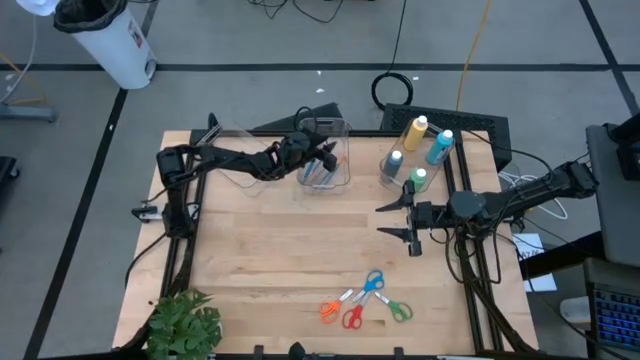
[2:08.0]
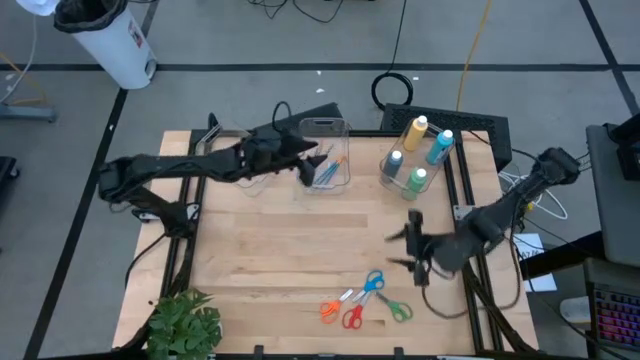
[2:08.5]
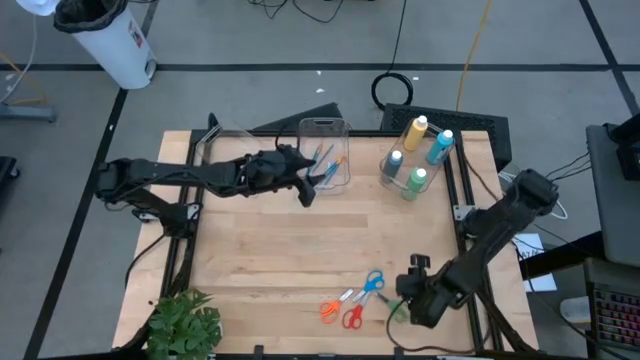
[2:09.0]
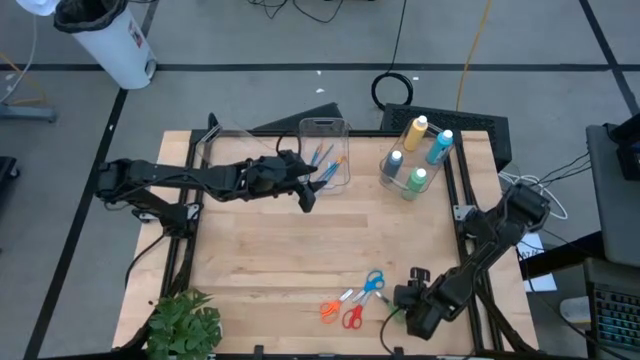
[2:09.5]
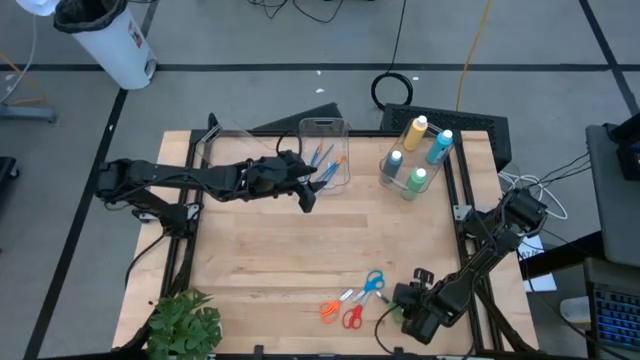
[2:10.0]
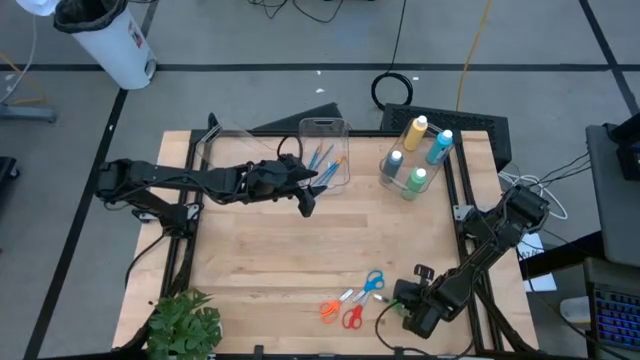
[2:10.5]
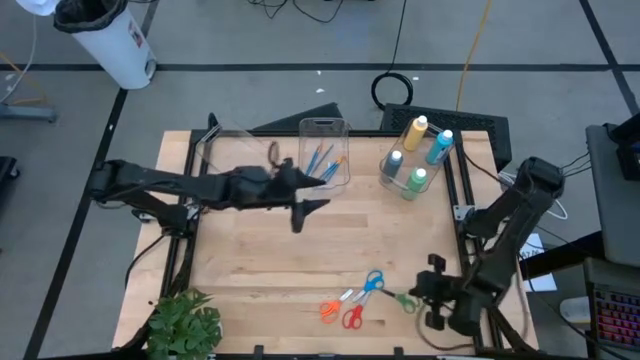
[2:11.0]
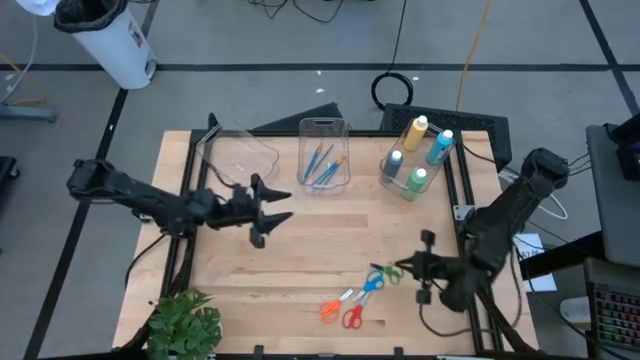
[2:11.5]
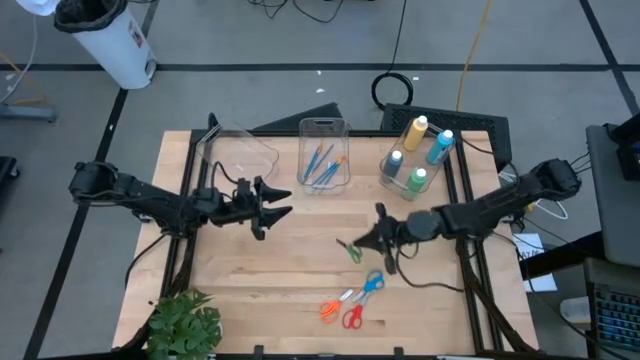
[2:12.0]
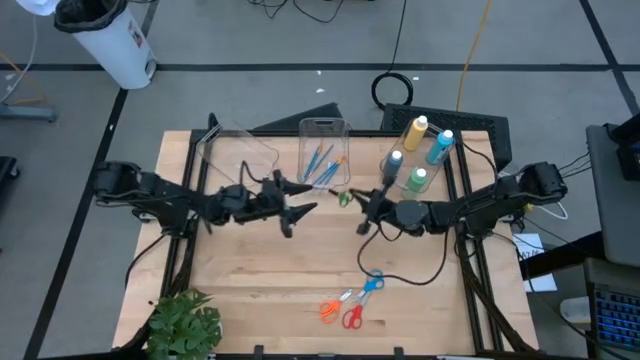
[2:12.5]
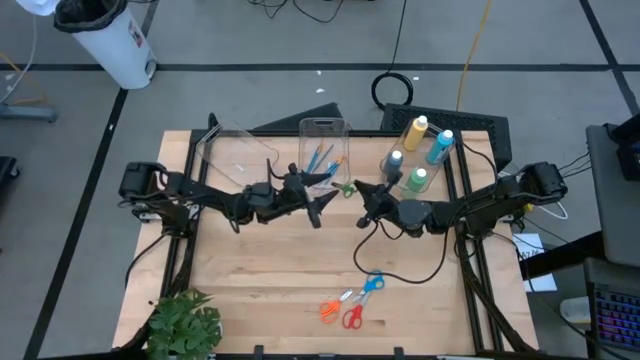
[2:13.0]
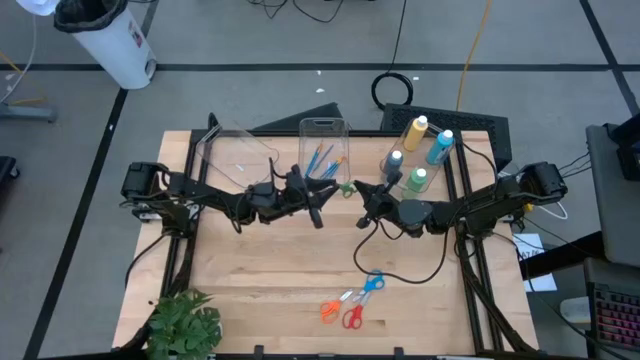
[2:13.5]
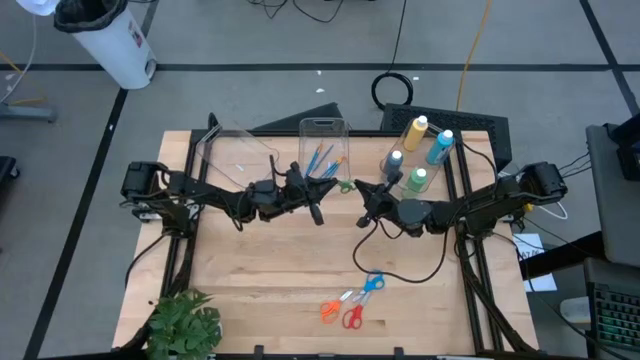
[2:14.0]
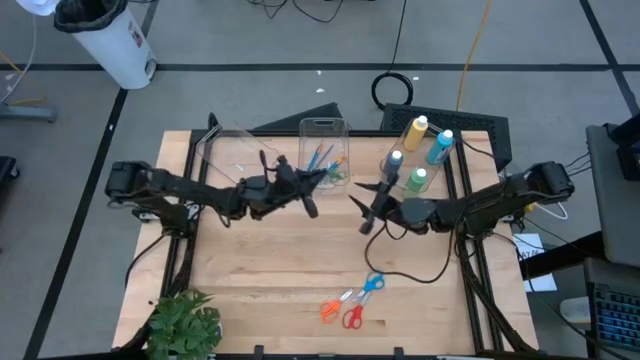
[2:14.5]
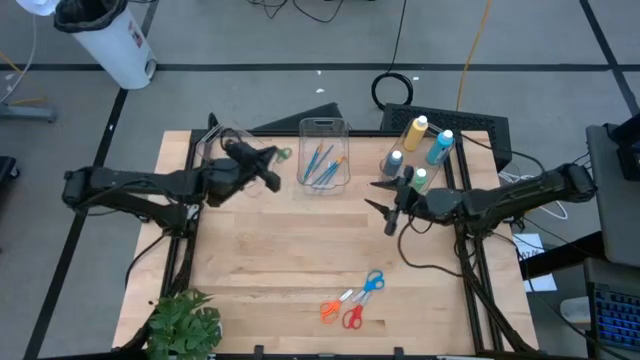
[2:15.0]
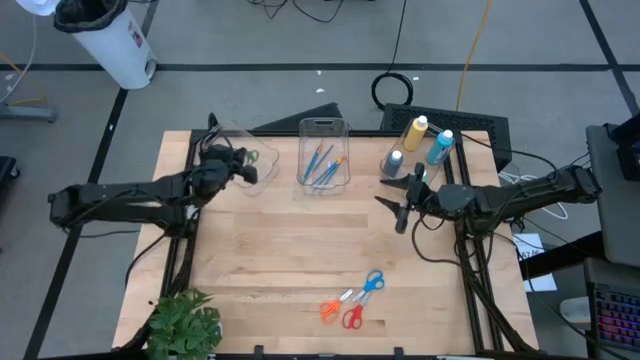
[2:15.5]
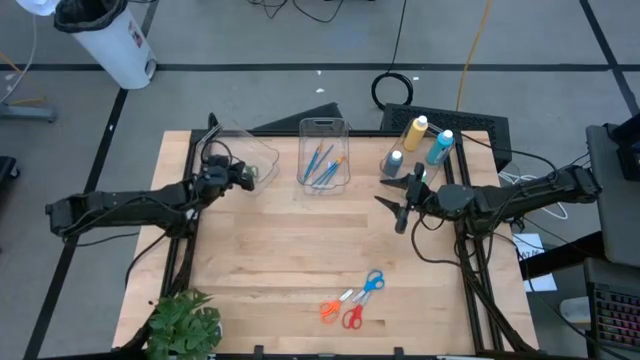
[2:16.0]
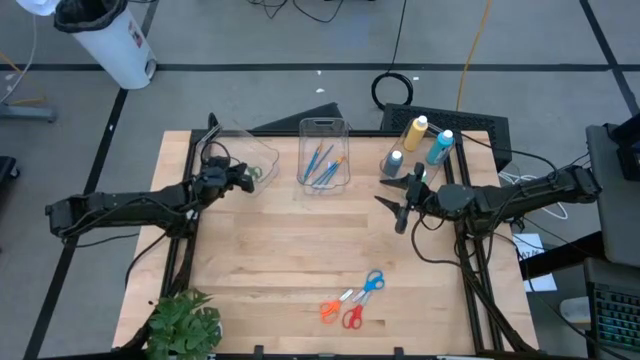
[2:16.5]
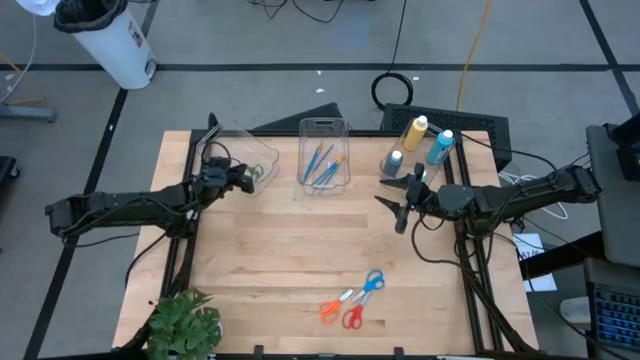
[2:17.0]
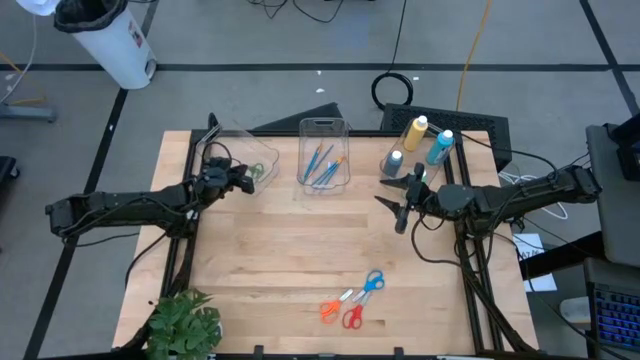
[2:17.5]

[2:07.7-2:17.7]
Task: Pick & Place Paint Supplies
Put the green scissors into the left transparent bin

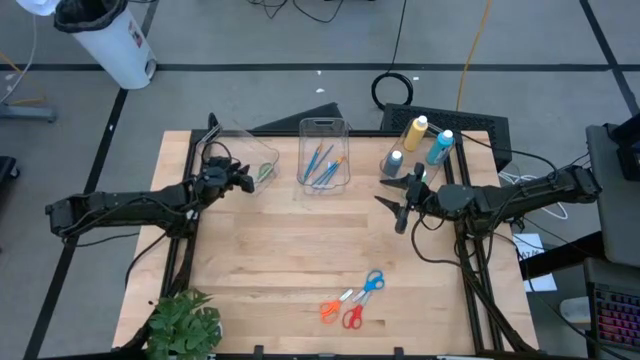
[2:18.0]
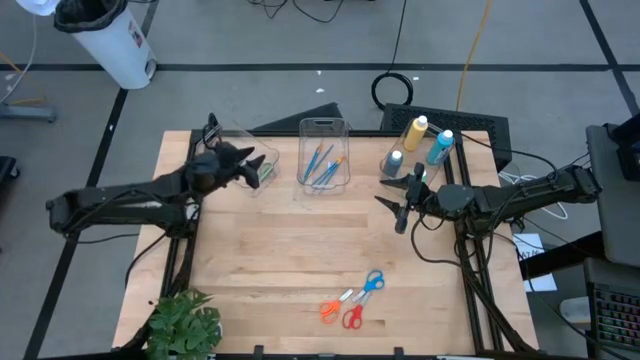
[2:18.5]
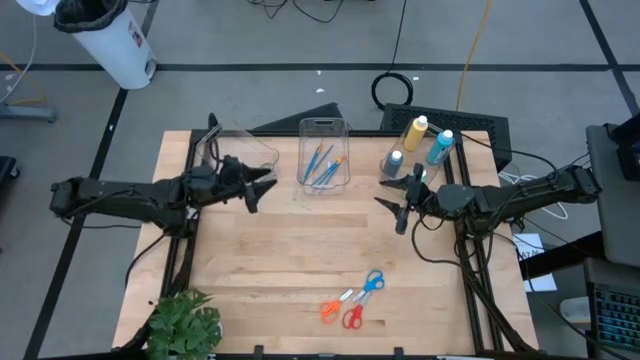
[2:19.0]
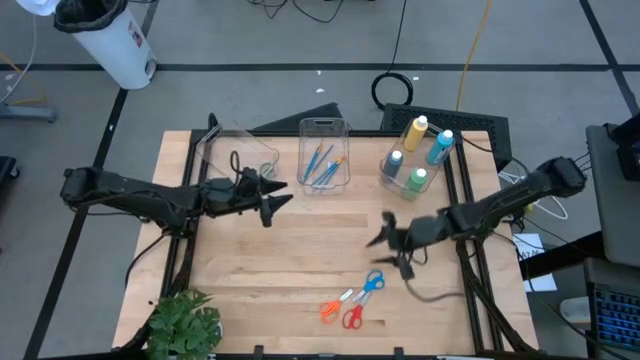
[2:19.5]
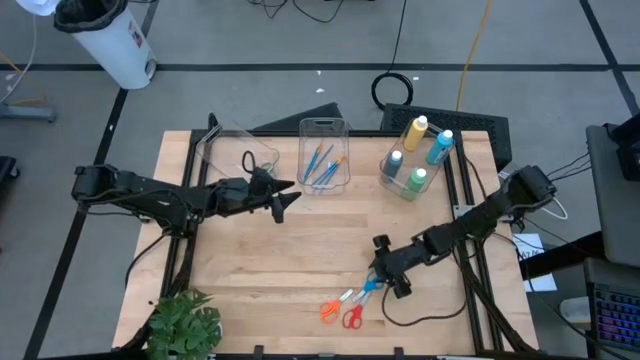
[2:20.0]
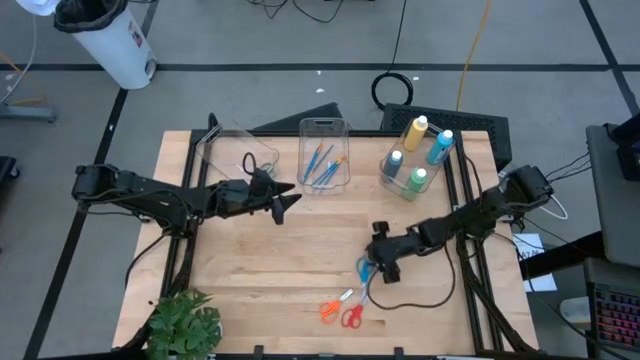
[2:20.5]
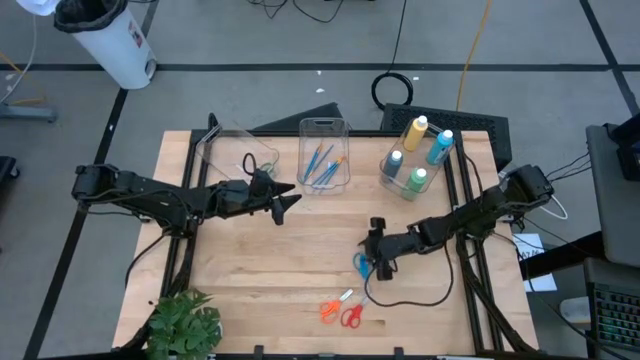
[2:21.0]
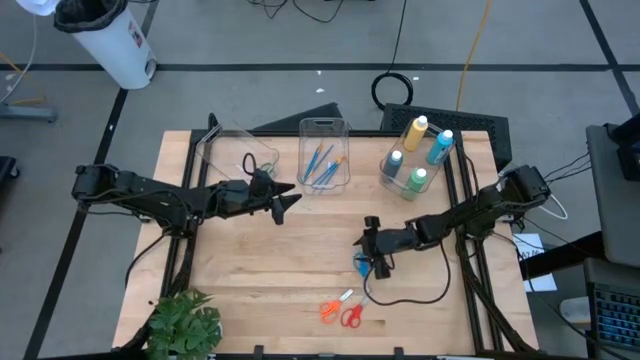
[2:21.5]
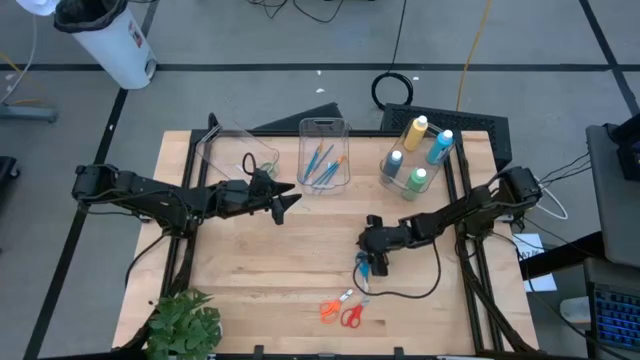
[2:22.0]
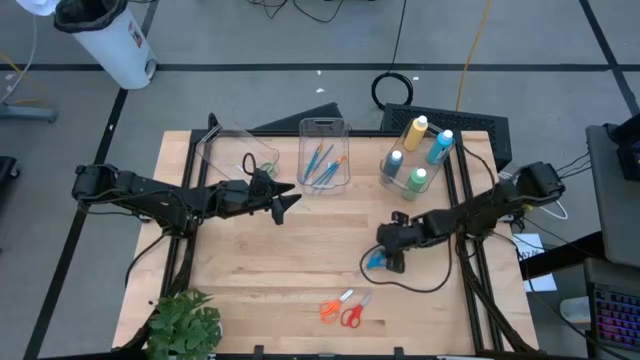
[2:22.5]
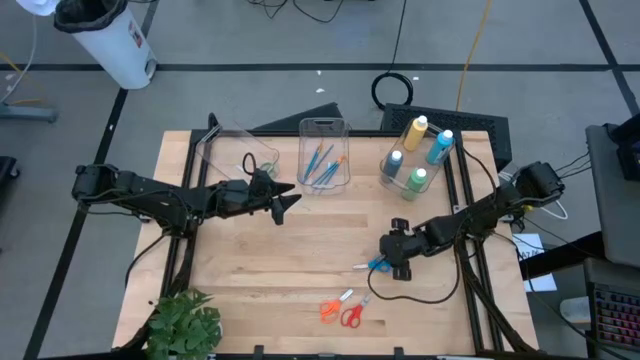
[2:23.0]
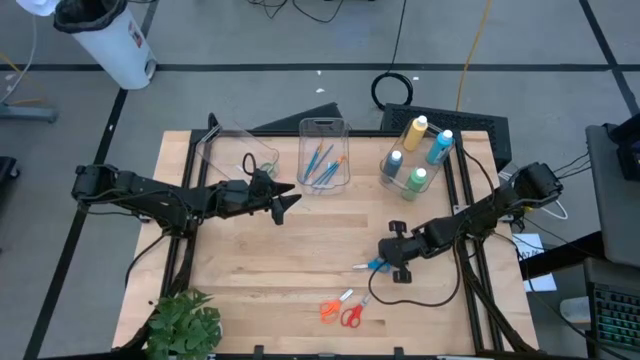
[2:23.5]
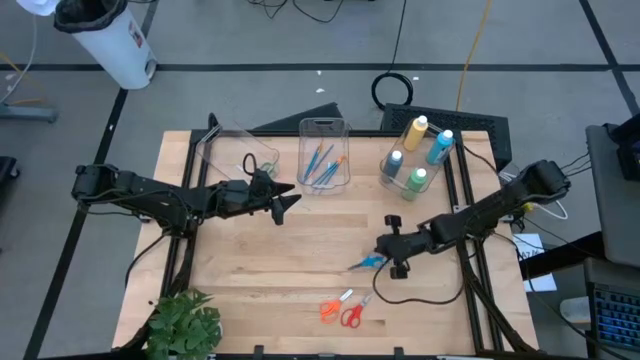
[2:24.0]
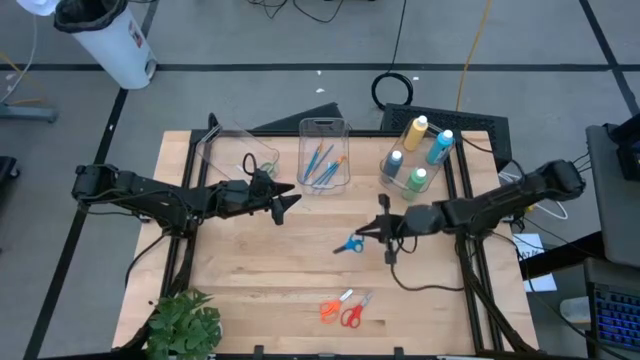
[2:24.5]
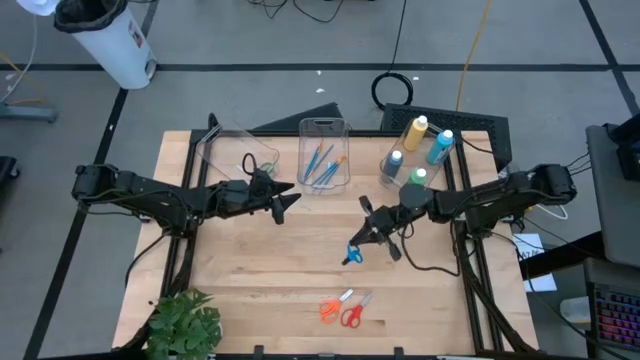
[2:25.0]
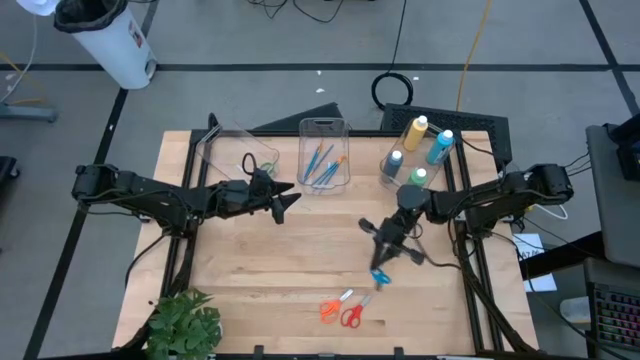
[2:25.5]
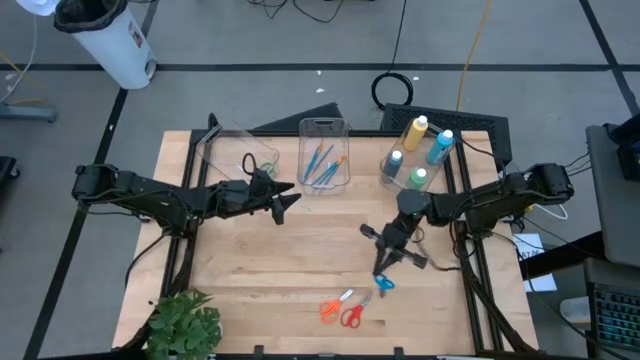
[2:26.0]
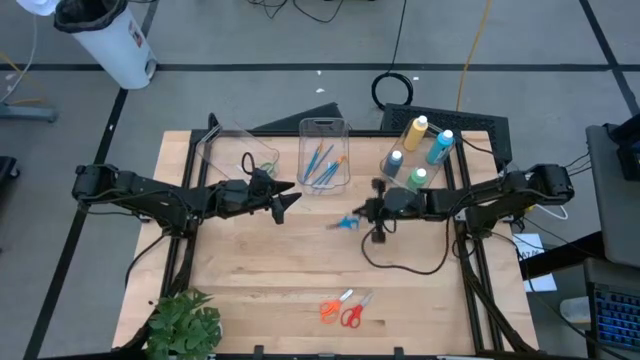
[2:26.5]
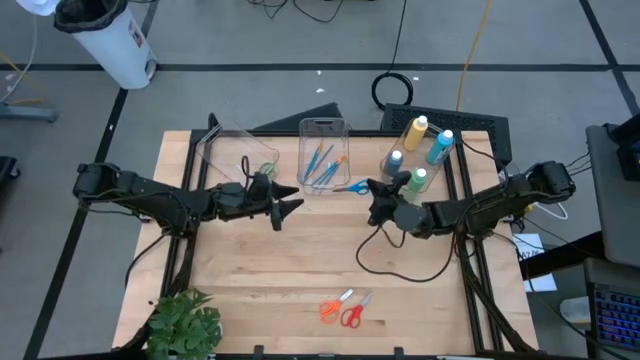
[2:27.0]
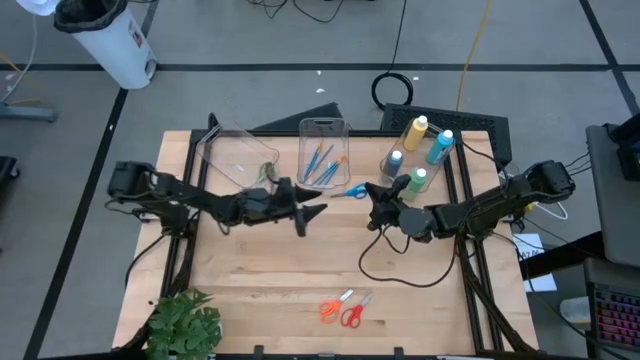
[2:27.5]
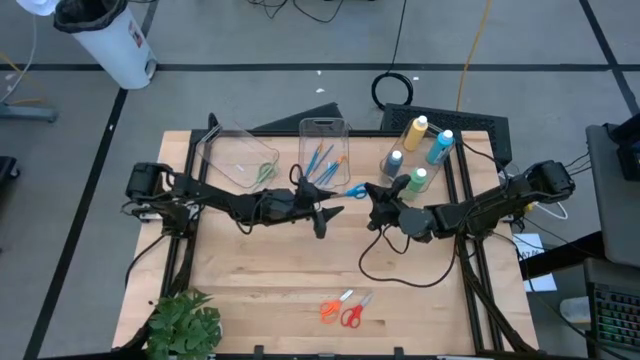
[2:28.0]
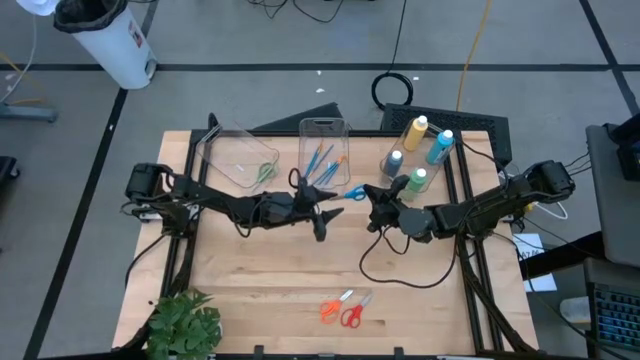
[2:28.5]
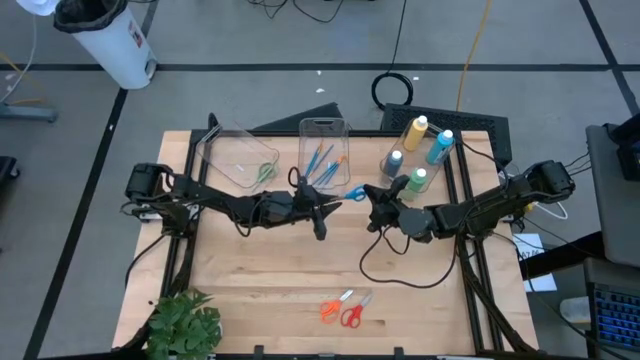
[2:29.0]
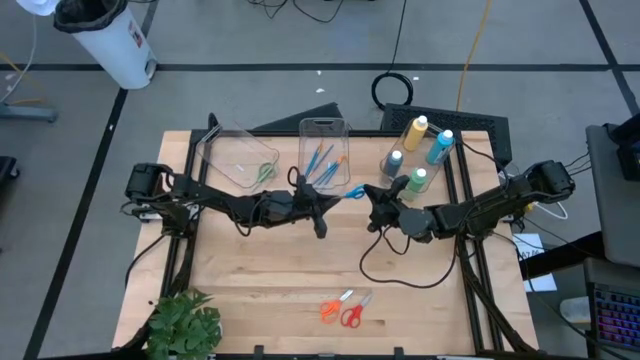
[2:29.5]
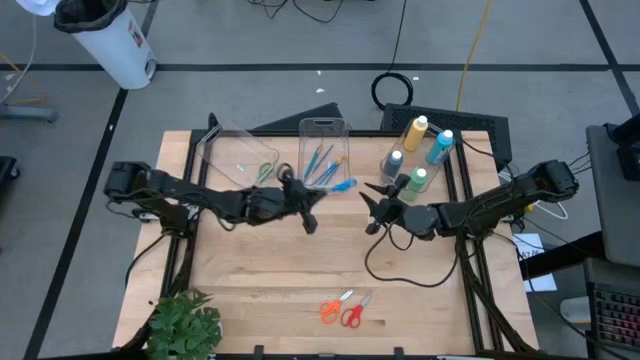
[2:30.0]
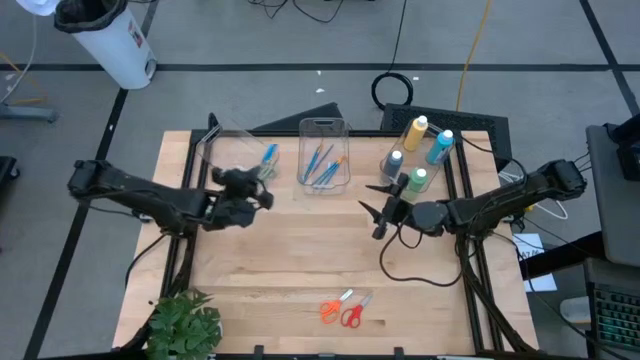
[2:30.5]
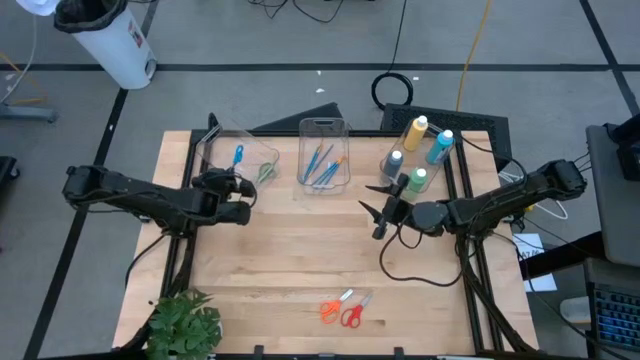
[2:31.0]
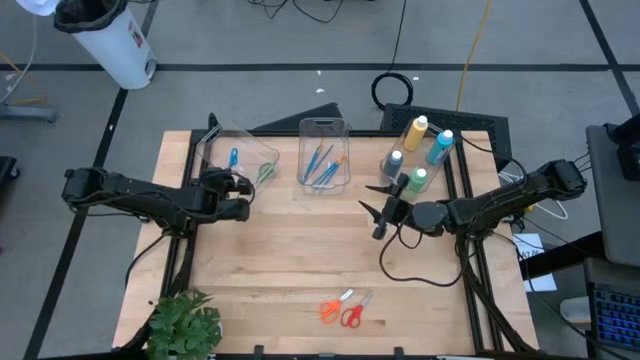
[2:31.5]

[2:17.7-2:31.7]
Put the blue scissors into the left transparent bin
